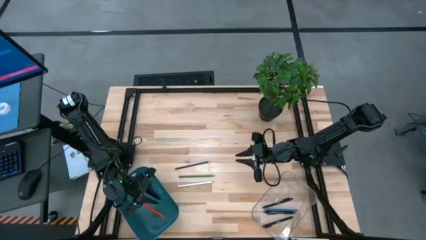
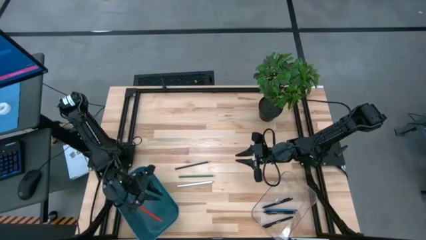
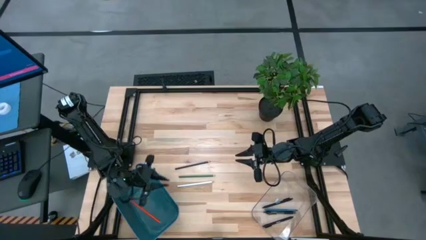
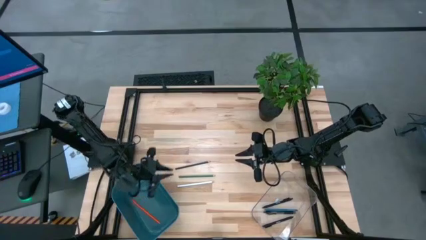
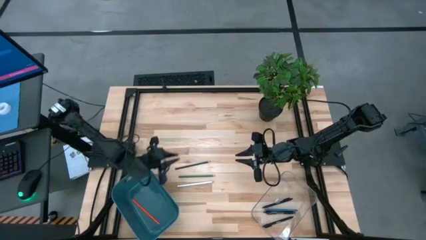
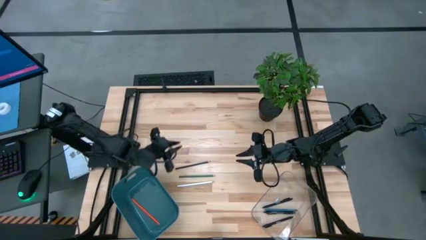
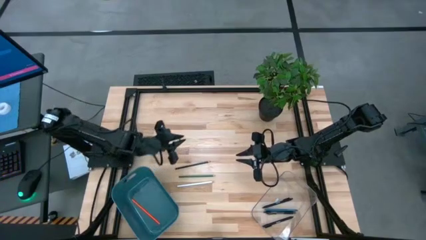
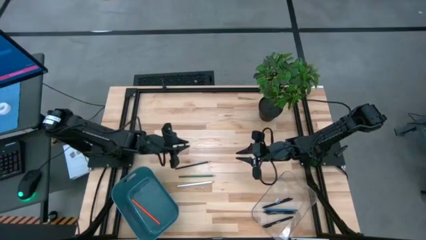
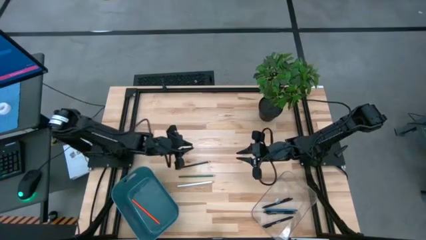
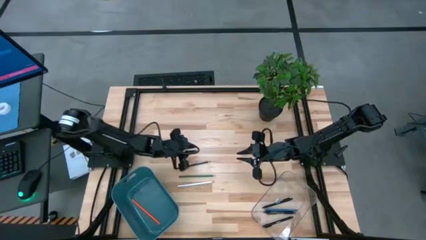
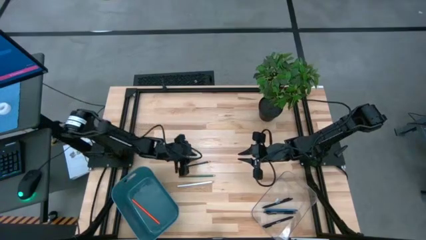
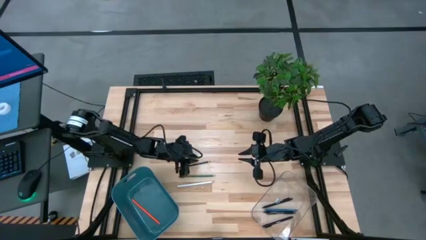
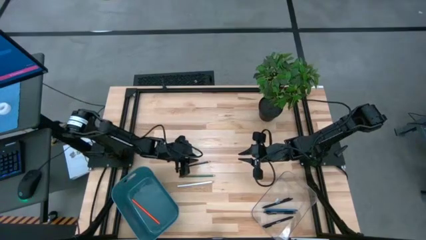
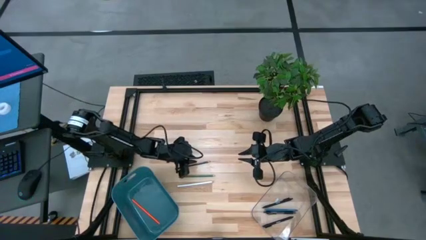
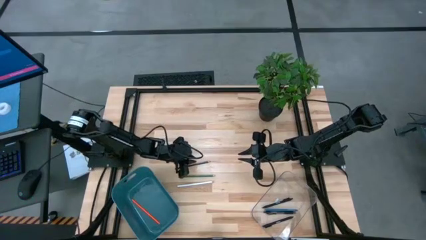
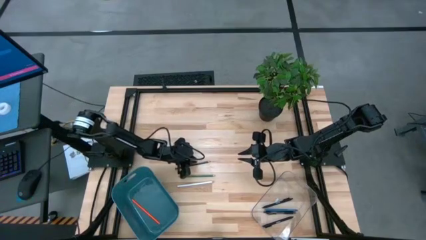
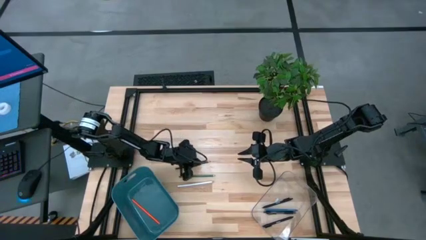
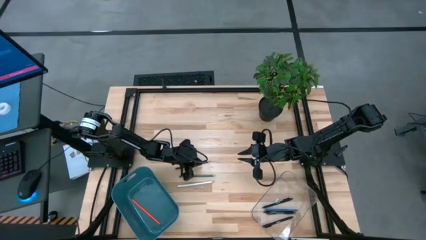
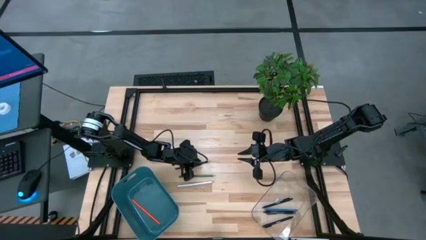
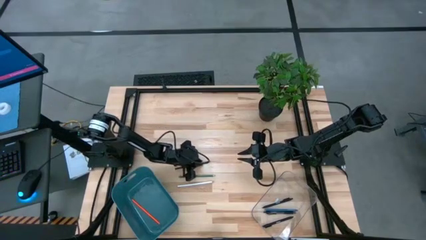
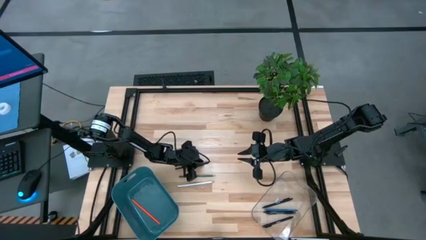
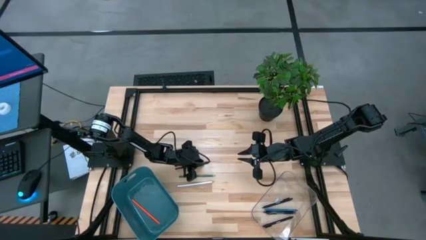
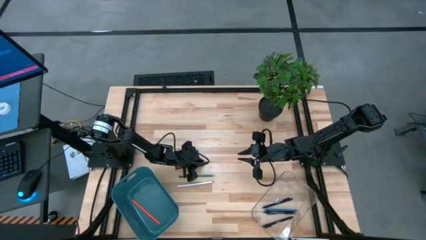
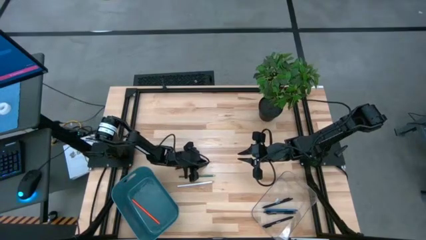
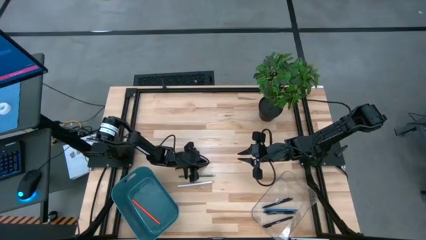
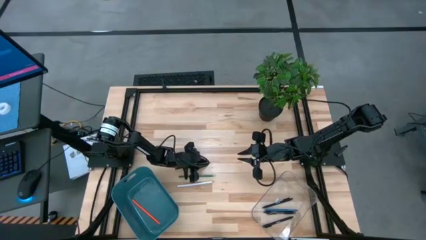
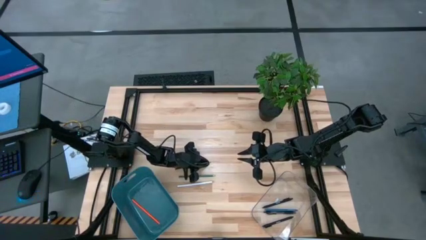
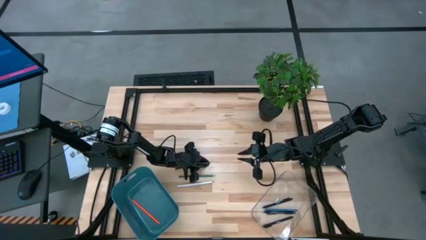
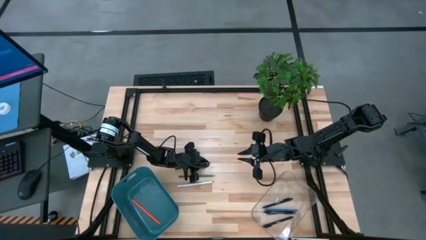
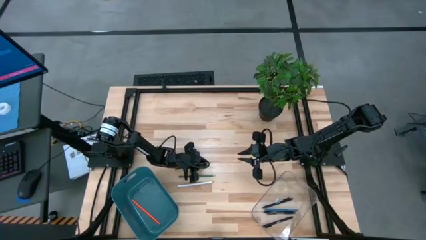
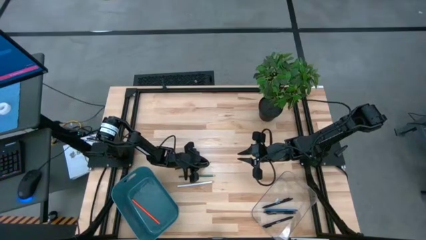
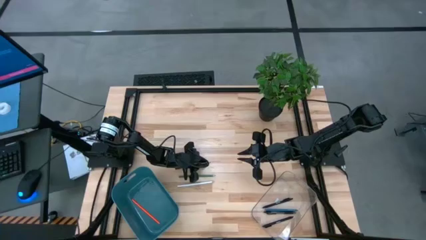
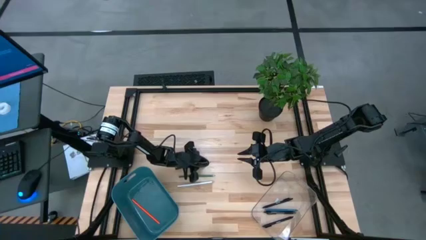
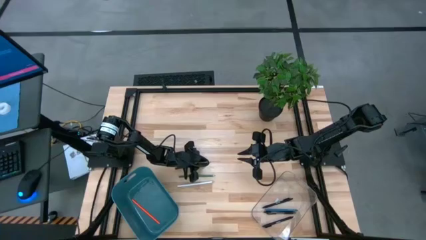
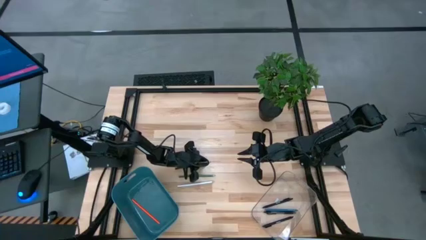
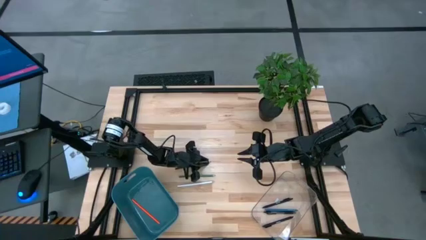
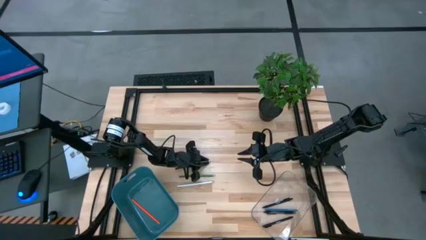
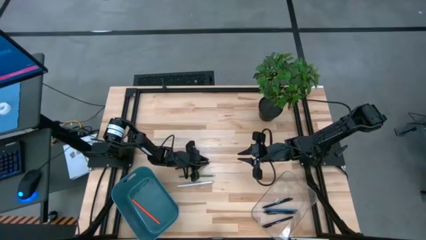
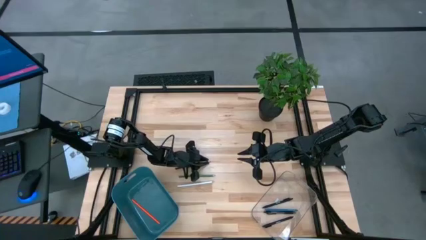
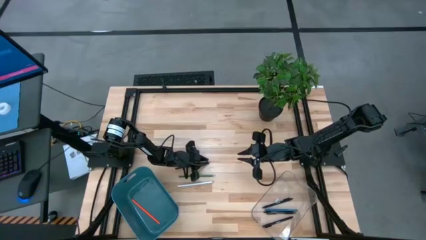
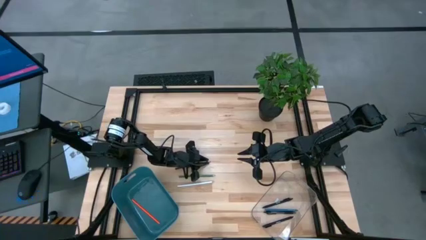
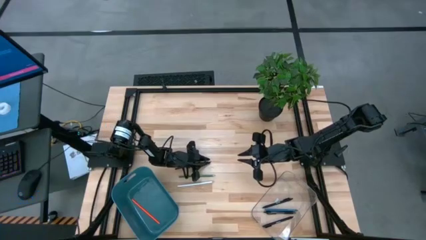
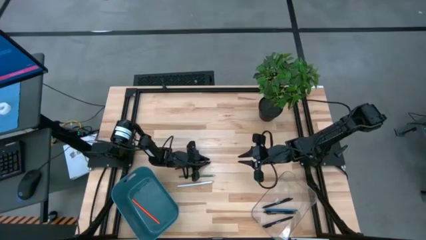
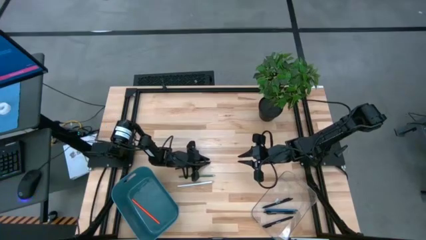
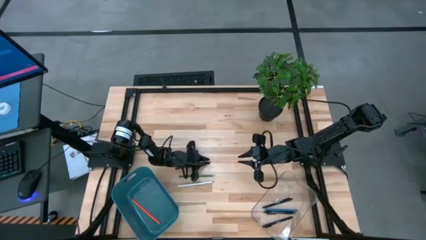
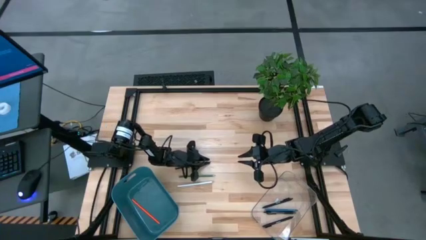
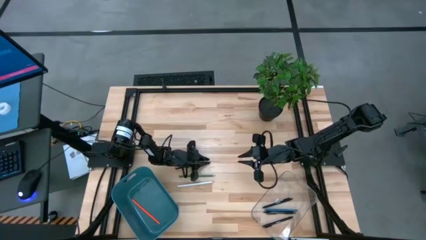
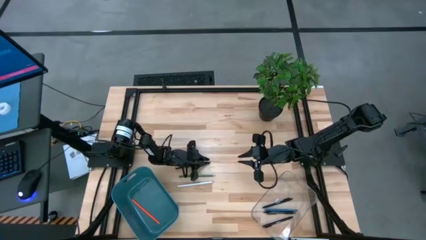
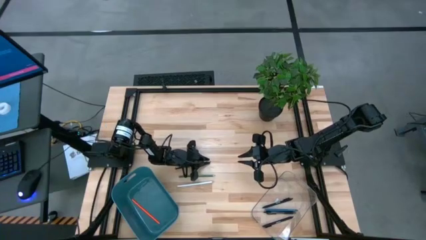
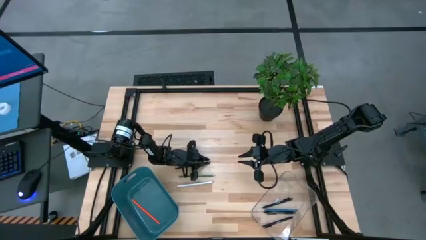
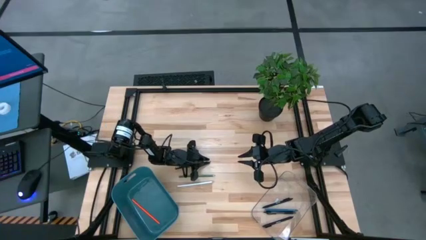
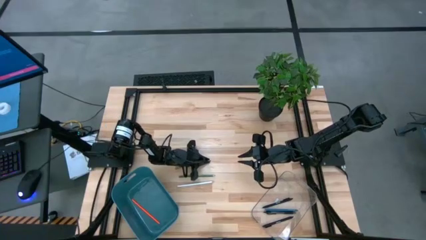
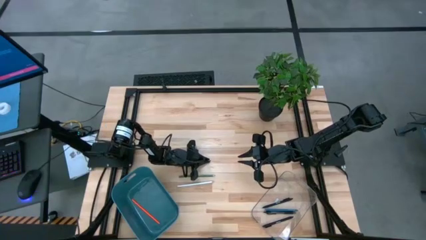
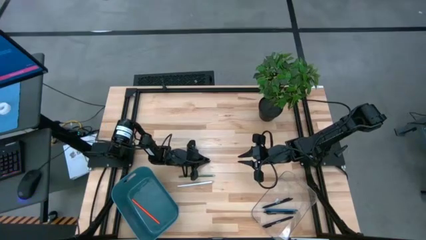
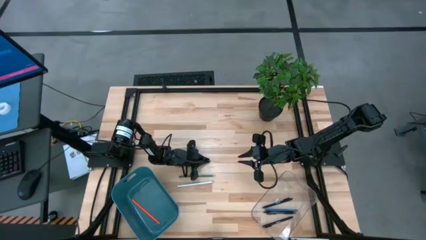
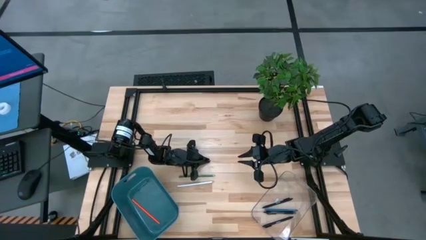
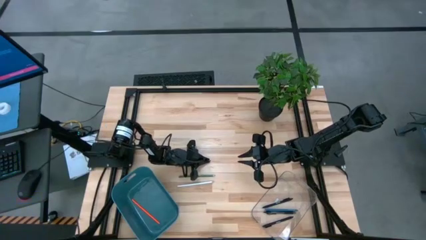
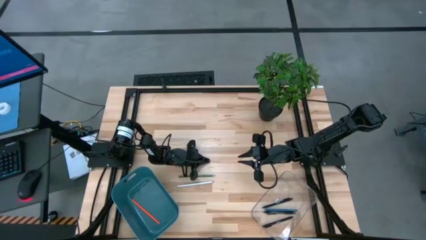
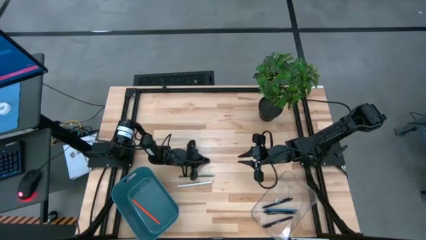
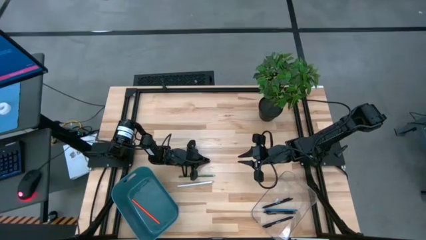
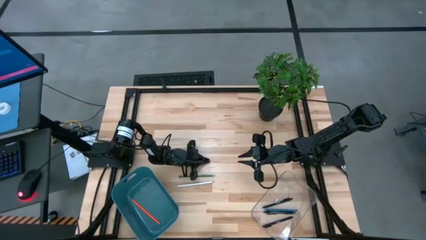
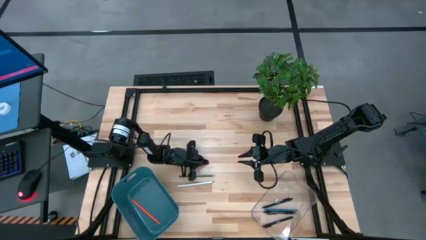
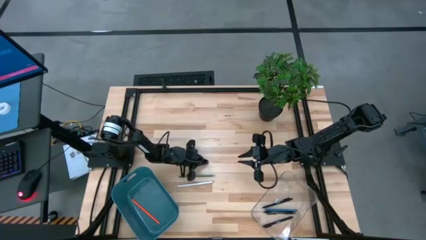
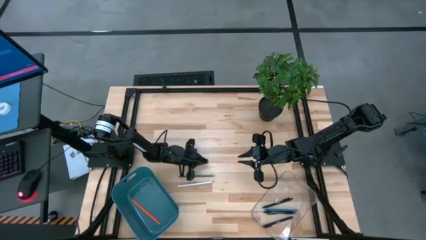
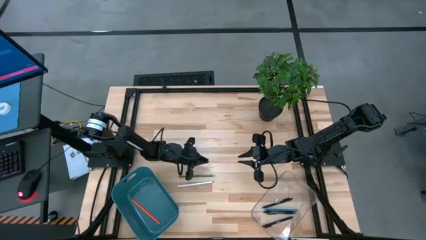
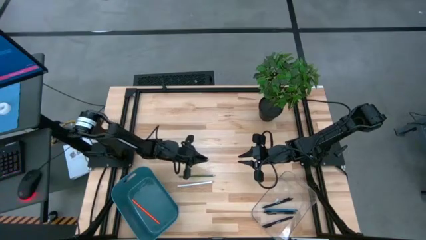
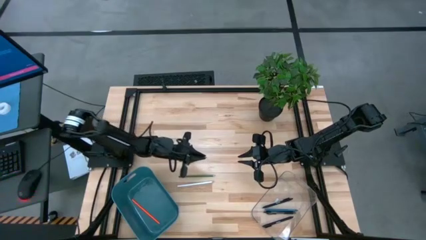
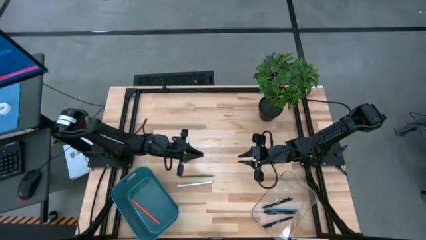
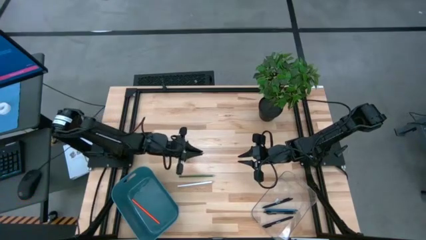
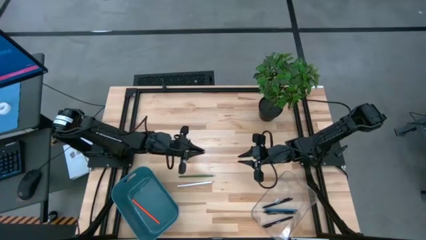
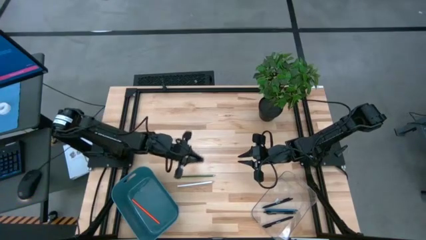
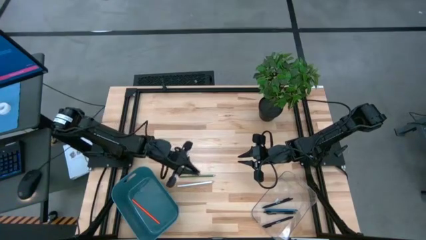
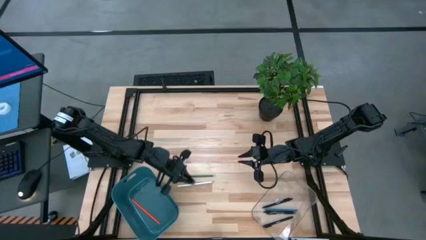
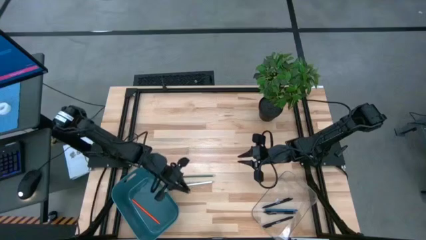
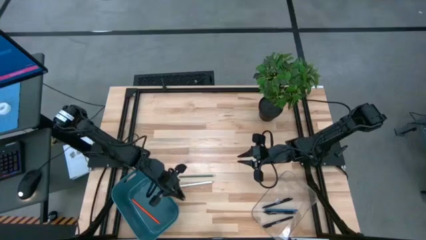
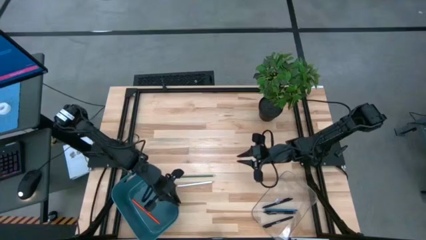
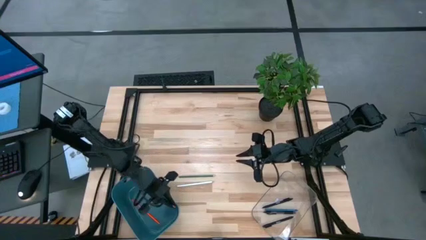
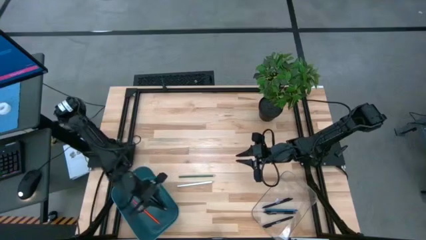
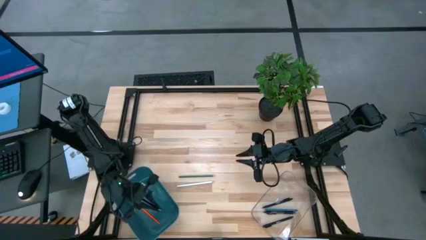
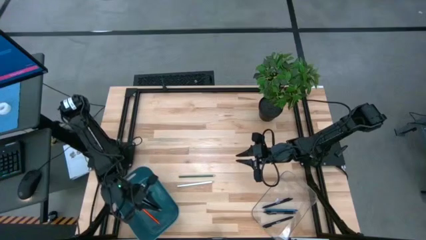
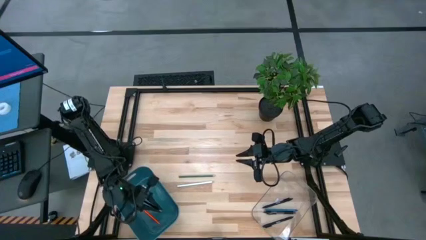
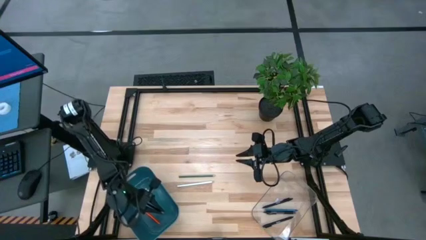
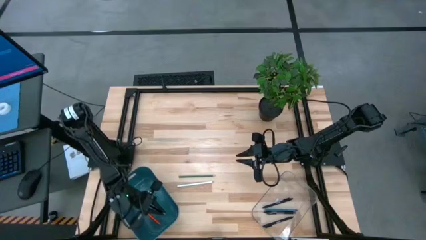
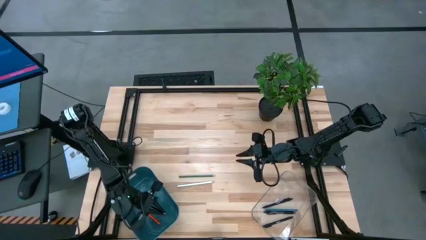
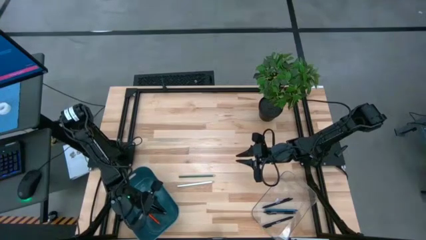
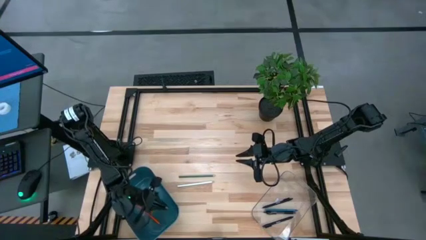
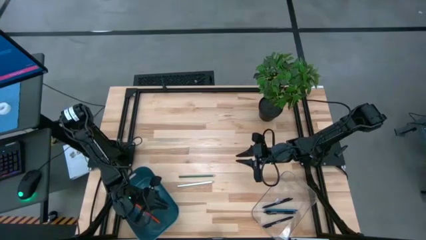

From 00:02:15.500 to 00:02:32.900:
Task: Sort pens & pencils
Put the black pencil in the blue bin
